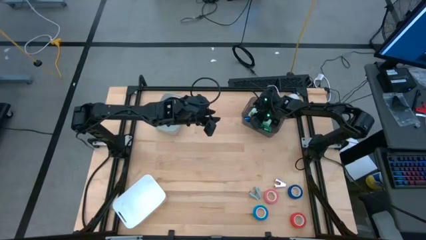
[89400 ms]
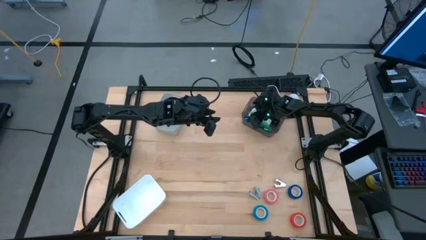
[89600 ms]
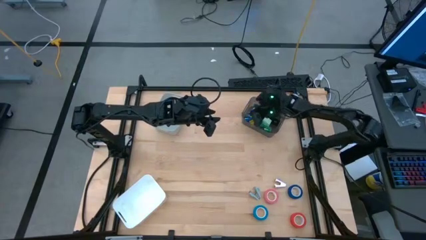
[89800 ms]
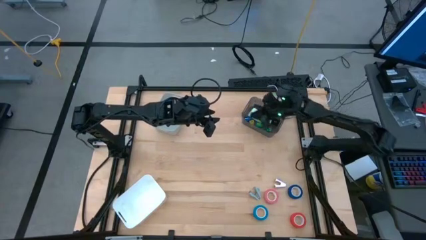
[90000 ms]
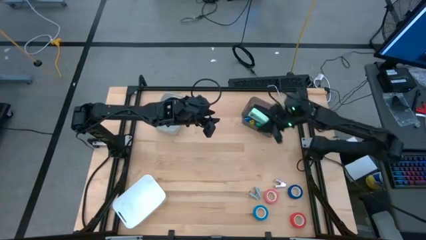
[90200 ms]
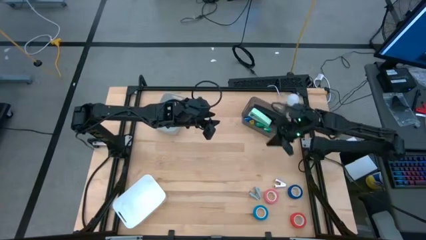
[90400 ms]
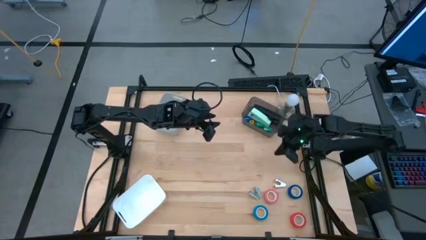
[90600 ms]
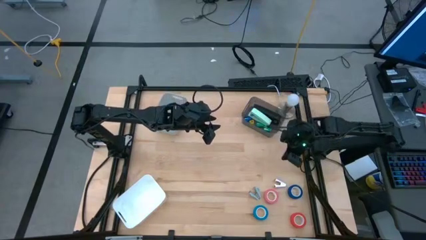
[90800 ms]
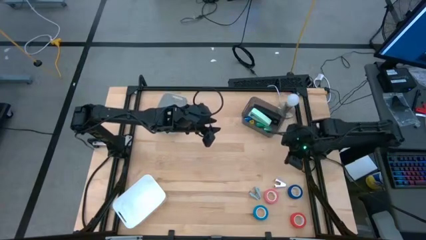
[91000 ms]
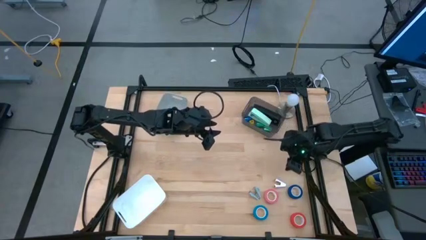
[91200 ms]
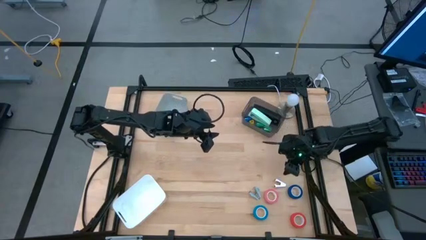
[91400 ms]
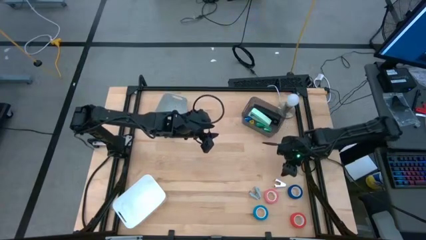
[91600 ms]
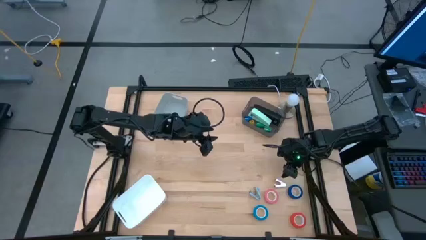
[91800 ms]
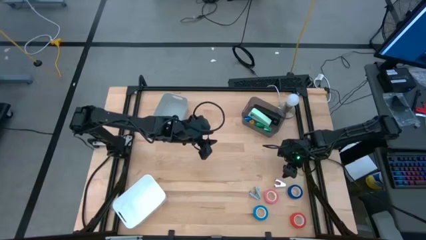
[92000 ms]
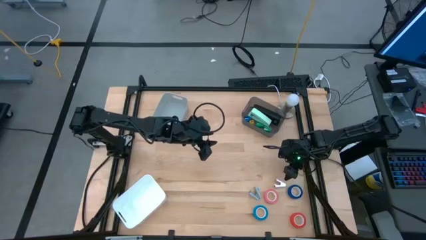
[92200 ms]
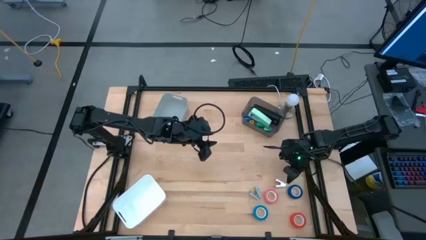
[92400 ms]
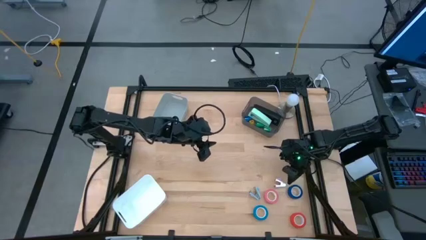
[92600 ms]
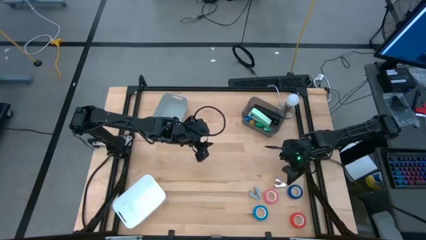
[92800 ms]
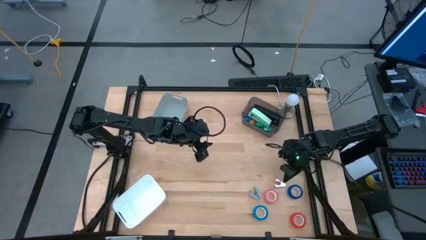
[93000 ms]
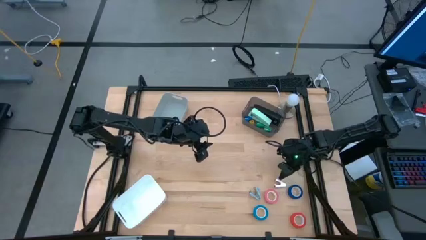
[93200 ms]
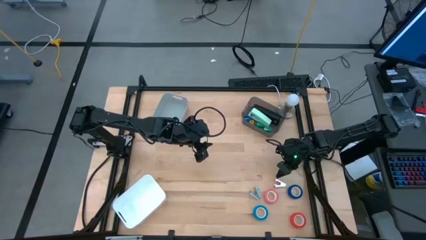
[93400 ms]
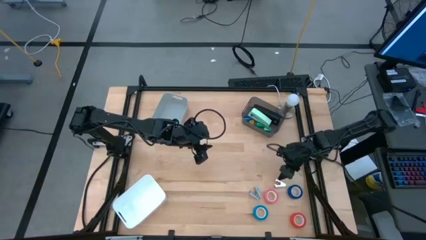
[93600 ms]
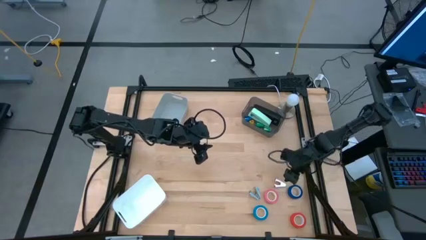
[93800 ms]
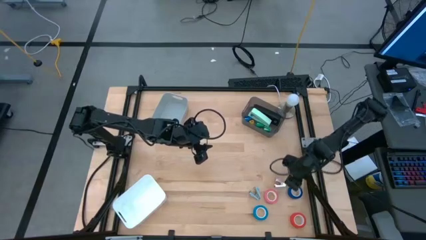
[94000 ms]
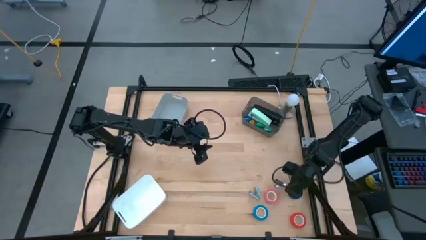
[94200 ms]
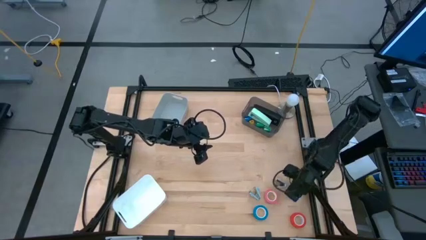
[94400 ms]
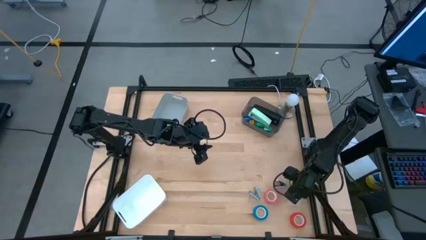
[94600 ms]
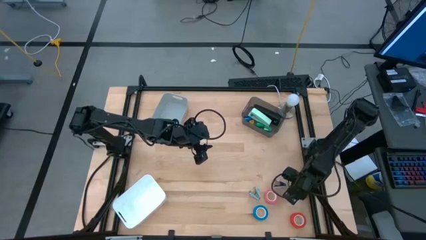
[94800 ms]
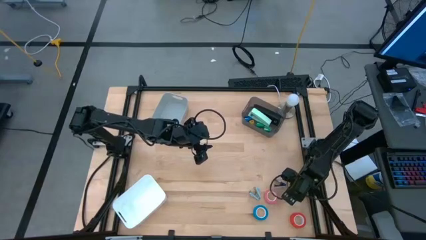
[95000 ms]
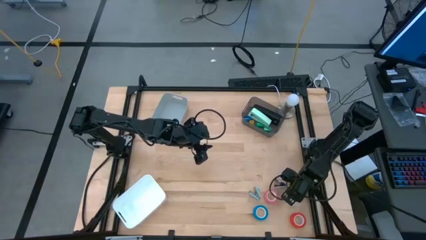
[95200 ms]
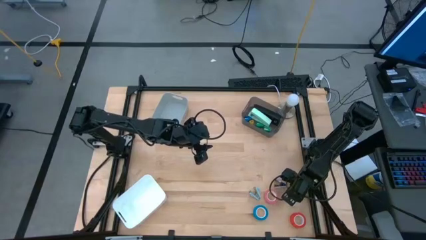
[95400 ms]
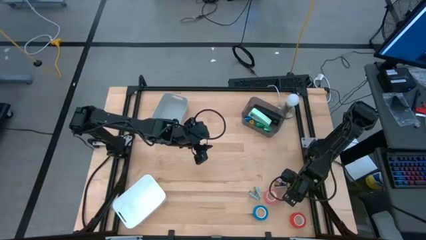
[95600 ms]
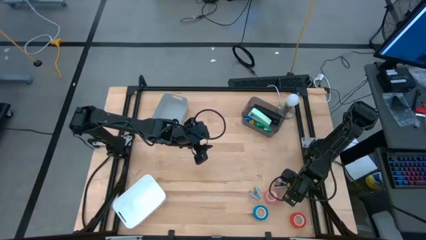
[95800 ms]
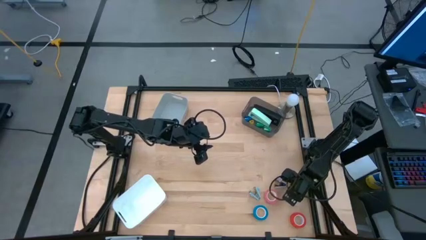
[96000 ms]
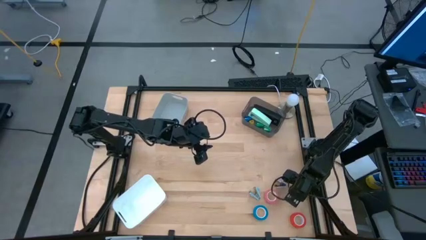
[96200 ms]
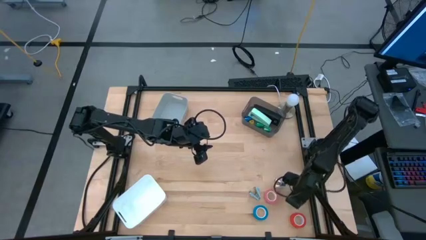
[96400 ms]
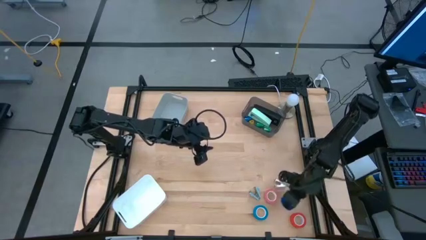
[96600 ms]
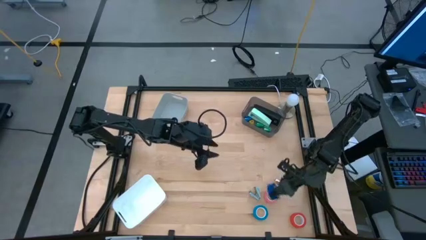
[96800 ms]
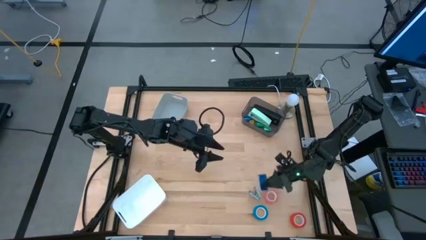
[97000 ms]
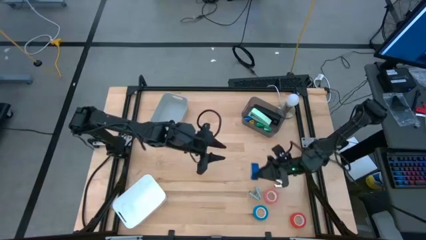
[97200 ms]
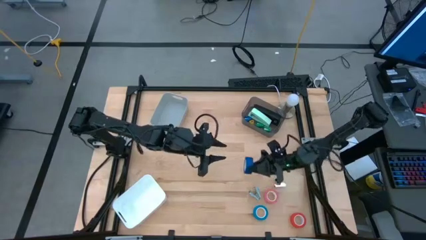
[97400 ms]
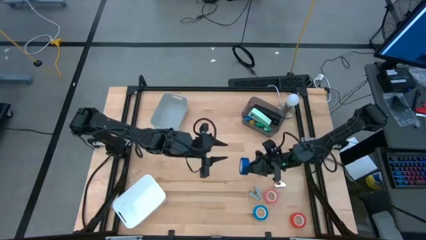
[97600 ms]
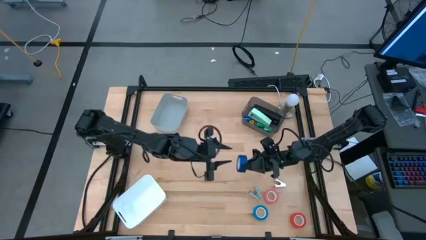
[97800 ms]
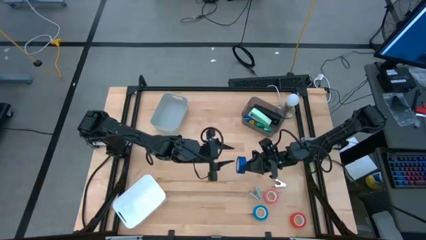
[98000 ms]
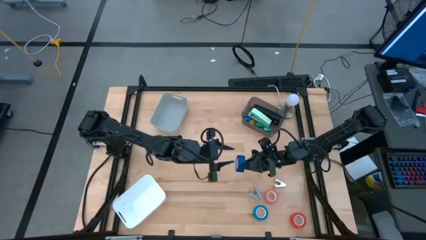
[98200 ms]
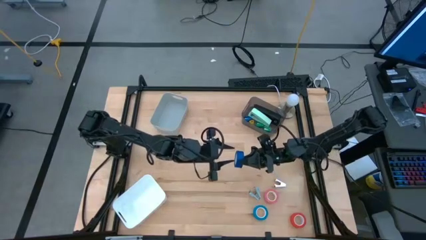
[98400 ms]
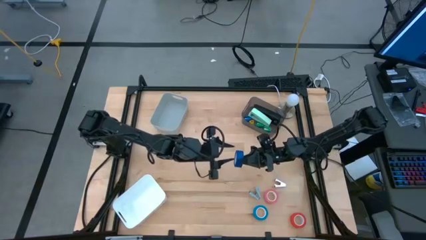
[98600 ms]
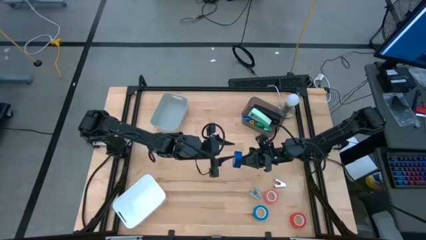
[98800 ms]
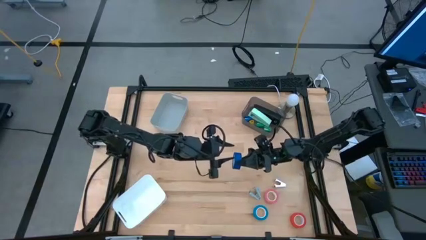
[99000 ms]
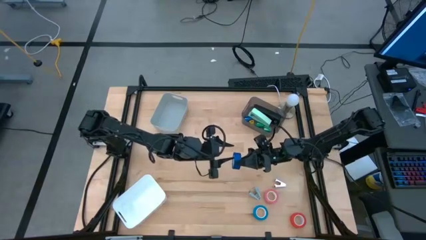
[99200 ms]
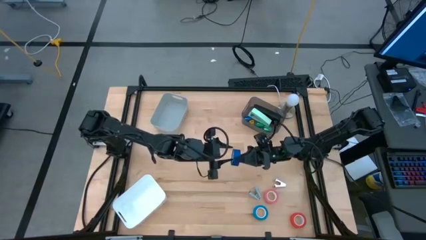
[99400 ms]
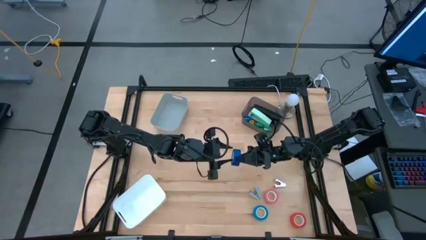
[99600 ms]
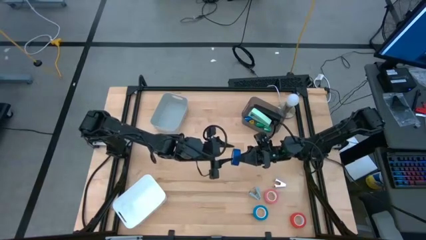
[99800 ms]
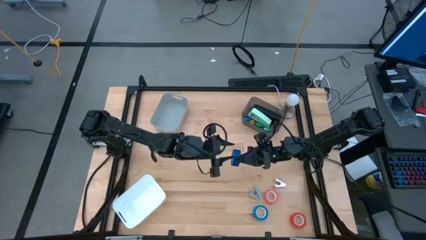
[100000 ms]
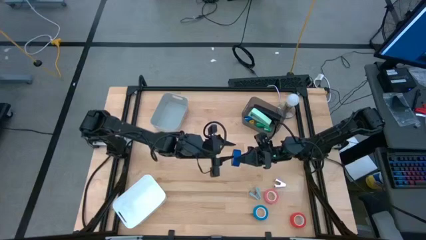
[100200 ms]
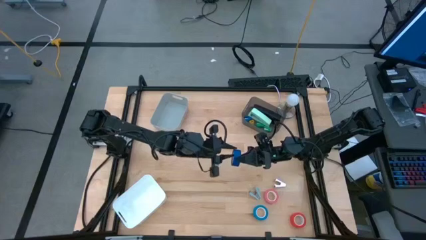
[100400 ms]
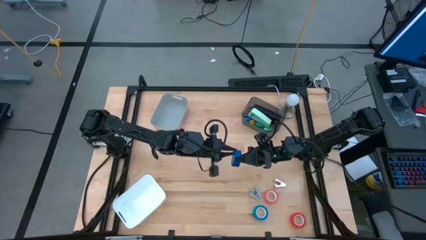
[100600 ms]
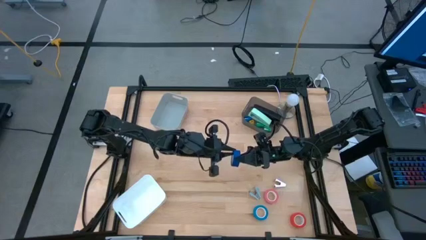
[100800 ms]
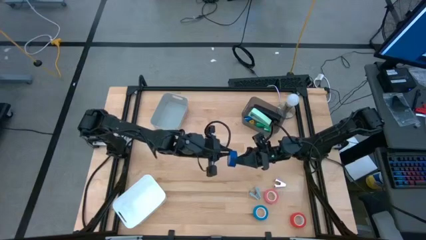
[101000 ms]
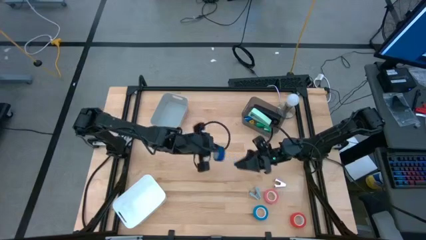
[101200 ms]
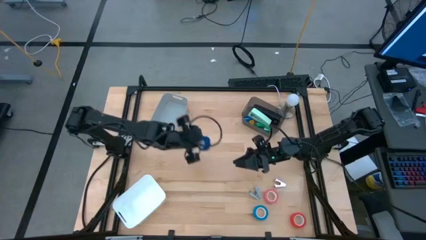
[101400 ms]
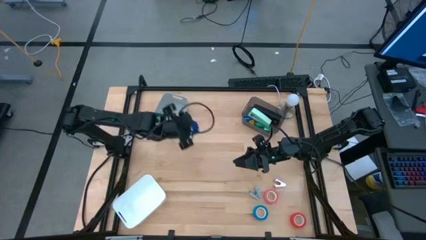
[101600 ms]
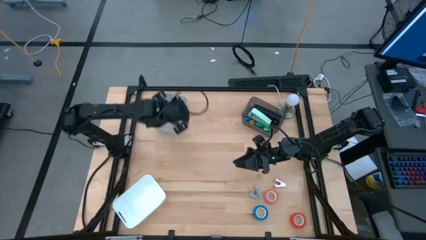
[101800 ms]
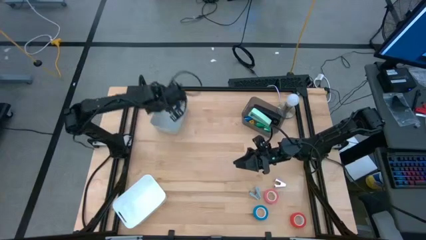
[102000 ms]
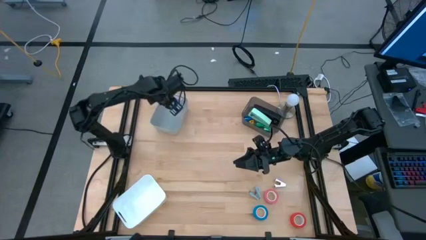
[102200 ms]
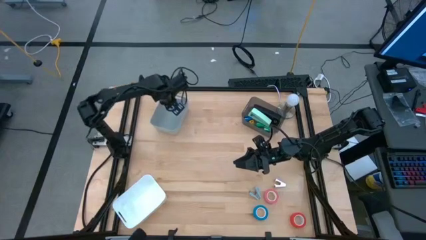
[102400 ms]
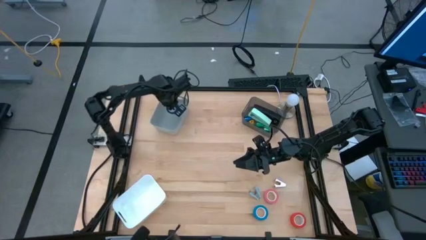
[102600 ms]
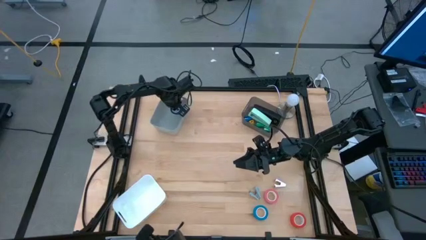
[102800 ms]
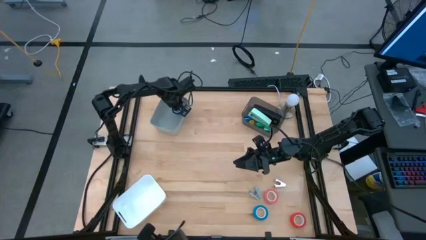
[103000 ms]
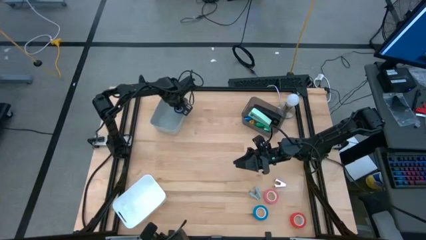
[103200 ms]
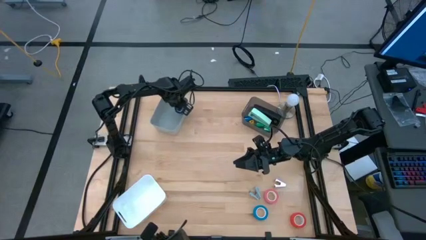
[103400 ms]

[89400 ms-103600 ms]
Task: Pick and place Stapler, Stapler remover, tape
Put the dark blue tape into the gray bin

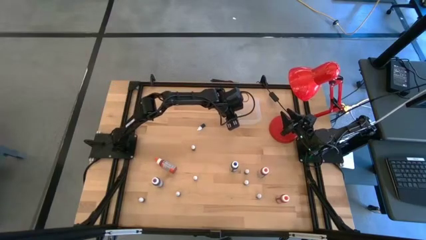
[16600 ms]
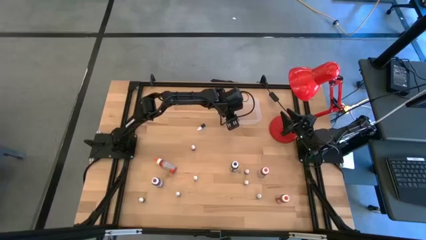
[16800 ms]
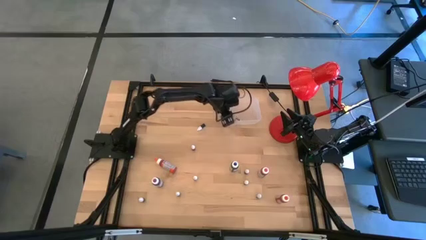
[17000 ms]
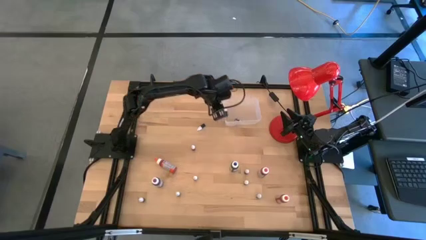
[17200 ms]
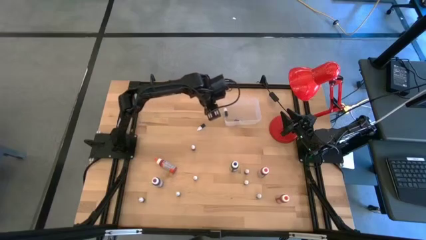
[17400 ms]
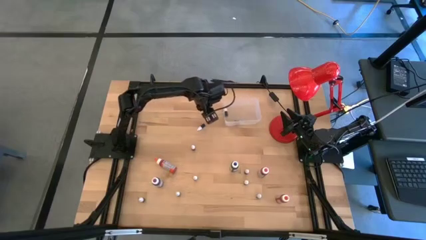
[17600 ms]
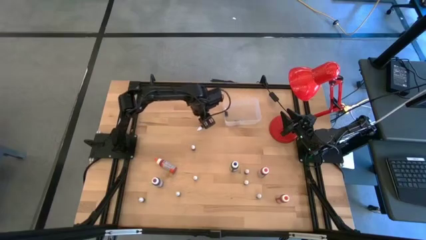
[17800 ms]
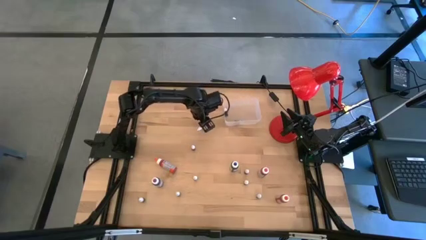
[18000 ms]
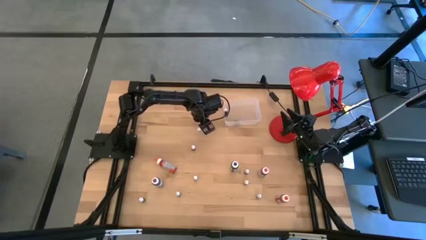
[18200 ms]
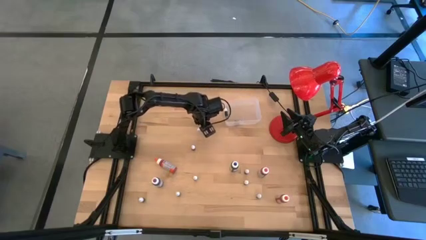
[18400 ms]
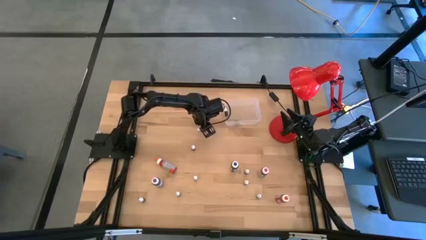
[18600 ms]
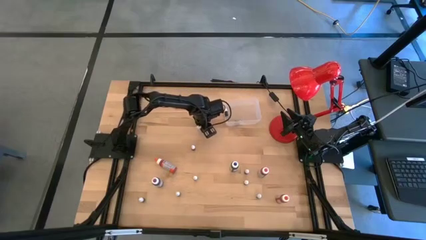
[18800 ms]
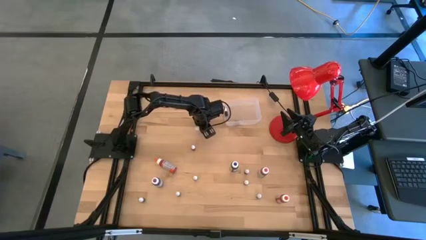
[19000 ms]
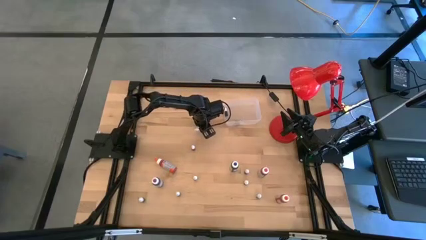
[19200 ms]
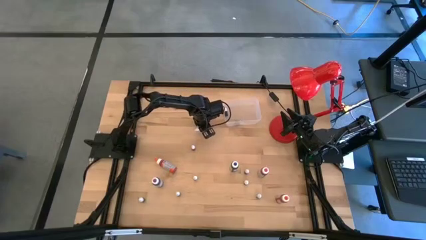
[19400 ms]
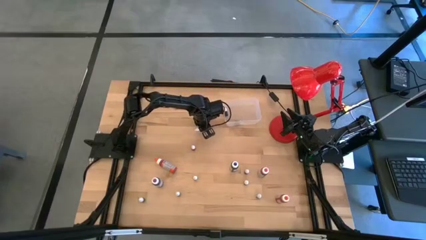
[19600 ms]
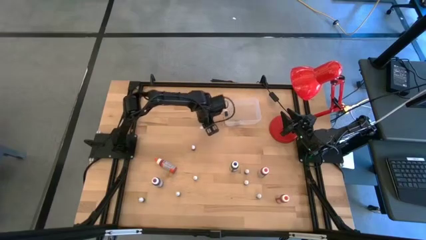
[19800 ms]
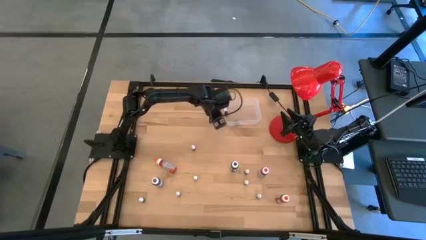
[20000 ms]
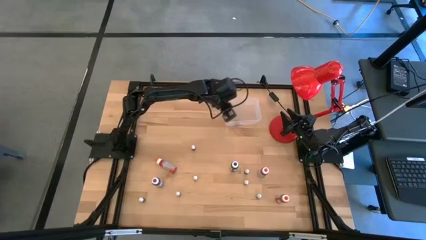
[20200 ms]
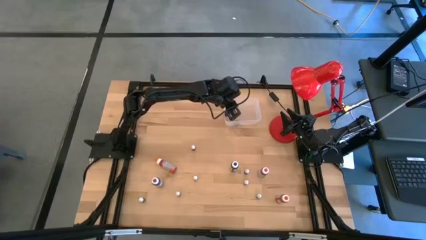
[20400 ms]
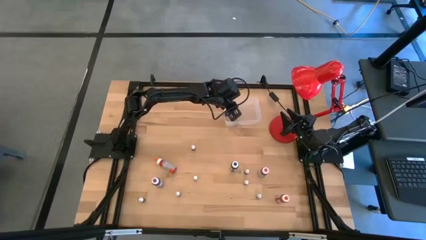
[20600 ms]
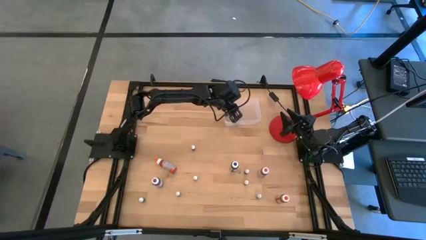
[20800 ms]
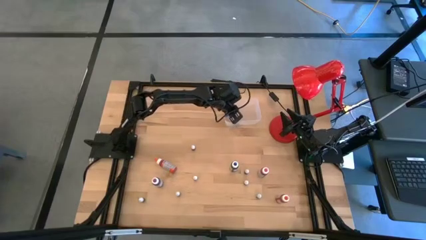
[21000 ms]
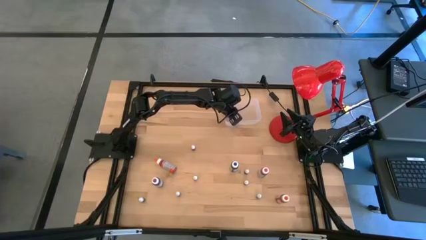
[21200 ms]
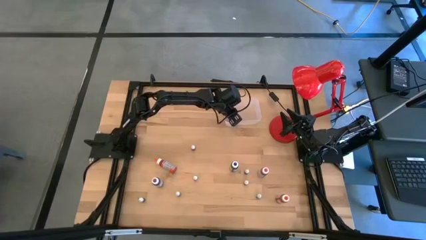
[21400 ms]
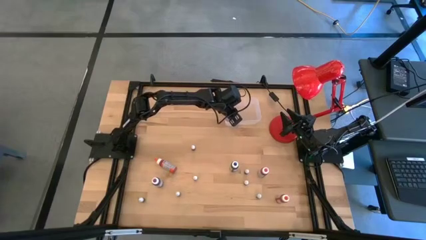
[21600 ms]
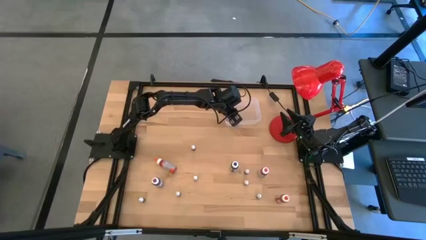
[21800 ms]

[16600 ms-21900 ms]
Task: Pick & Place food coloring
Put the top small blue food coloring bottle in the transparent bin
